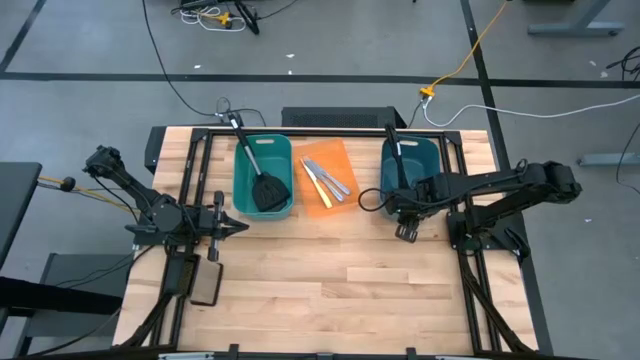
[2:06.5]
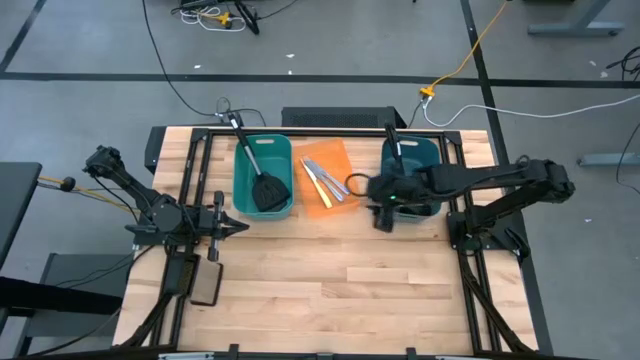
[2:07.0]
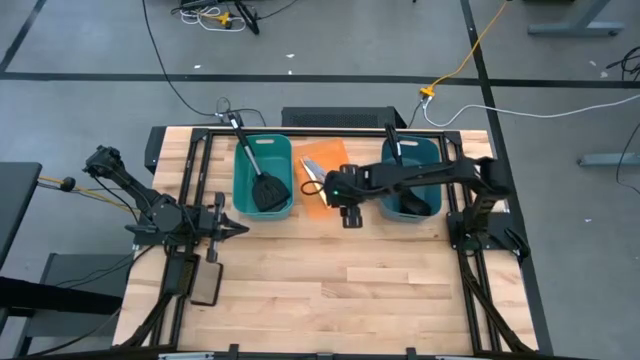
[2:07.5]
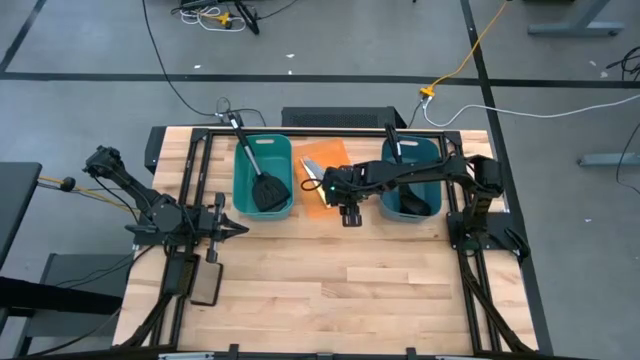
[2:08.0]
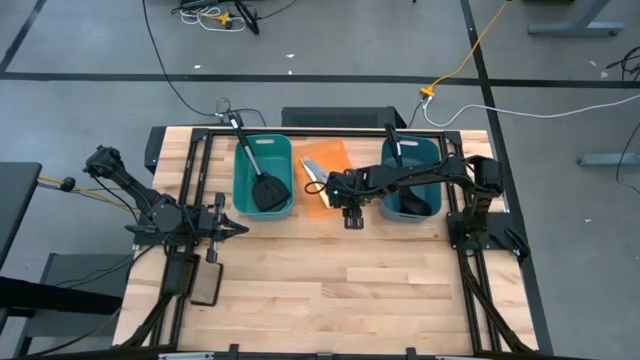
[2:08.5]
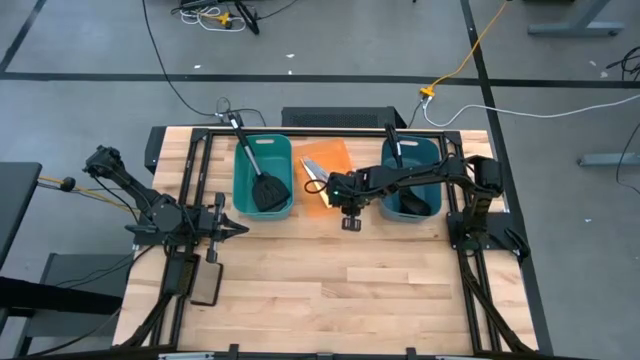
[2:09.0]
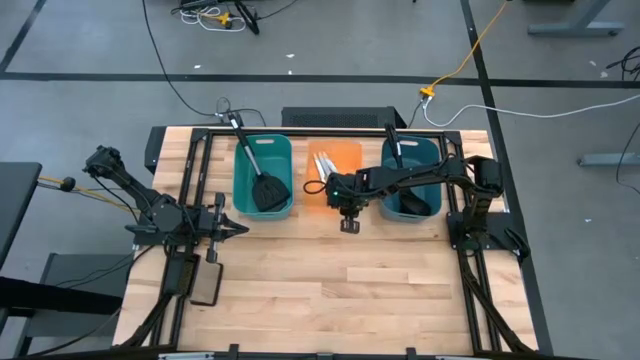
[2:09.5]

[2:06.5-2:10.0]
Task: Pick & Place Kitchen Items
Adjust the orange bin

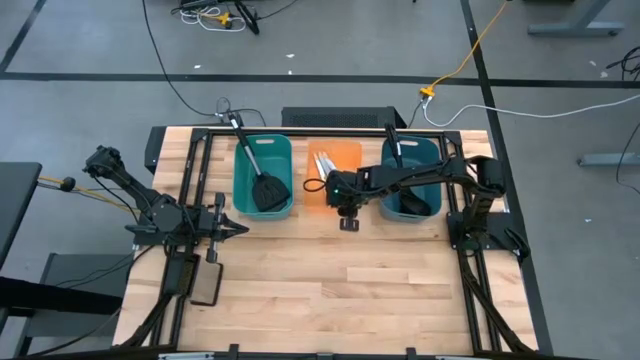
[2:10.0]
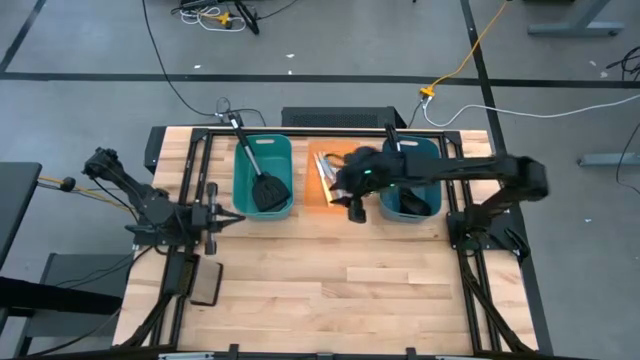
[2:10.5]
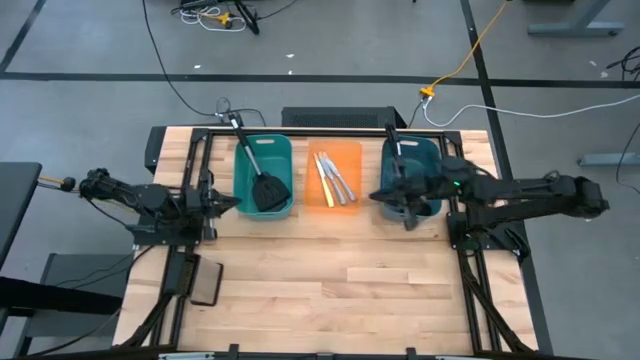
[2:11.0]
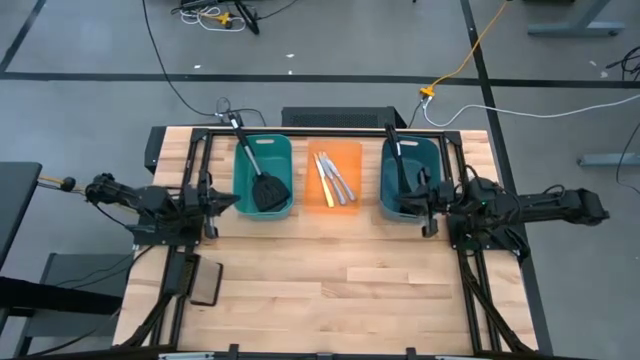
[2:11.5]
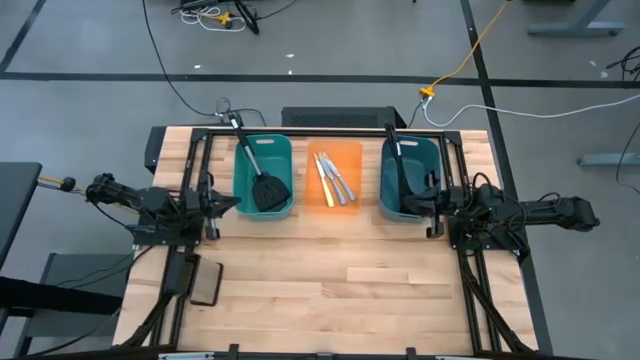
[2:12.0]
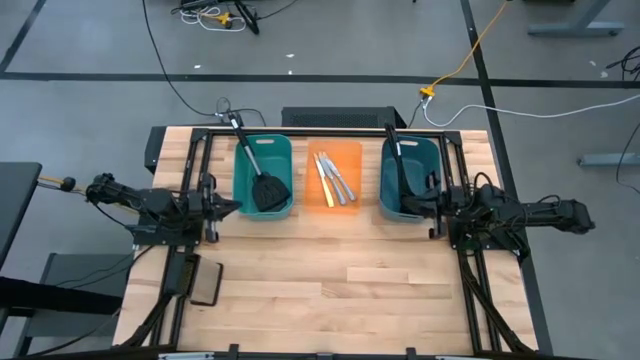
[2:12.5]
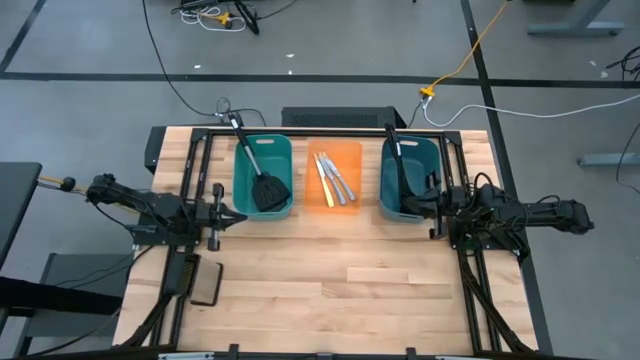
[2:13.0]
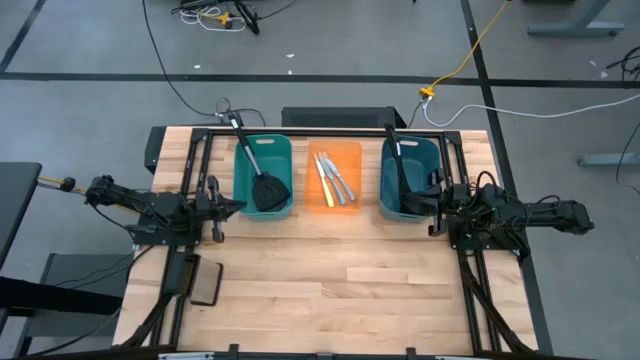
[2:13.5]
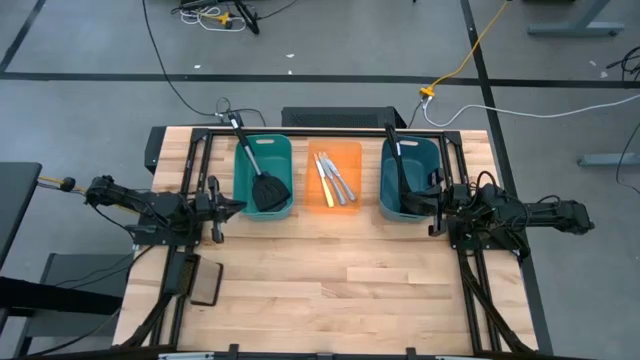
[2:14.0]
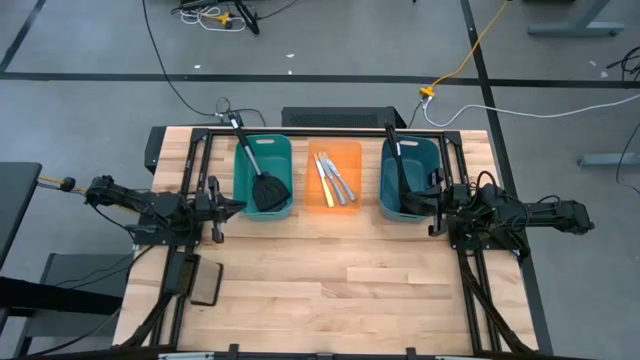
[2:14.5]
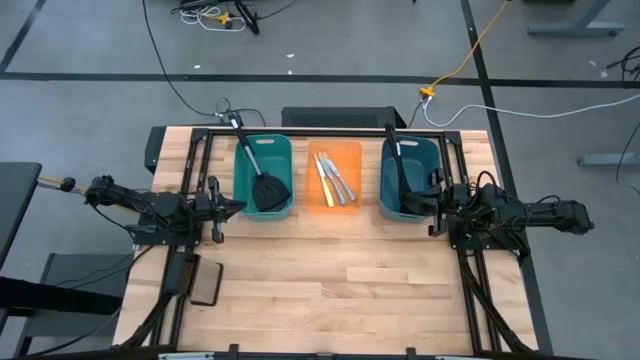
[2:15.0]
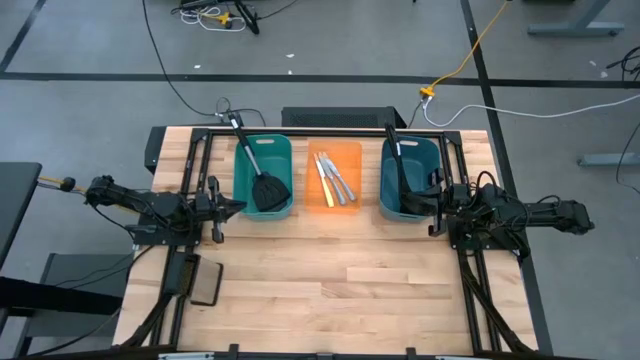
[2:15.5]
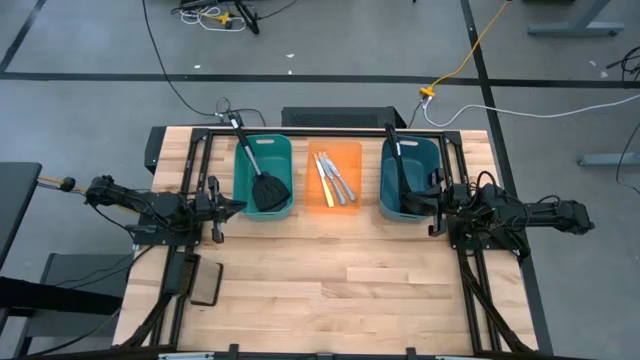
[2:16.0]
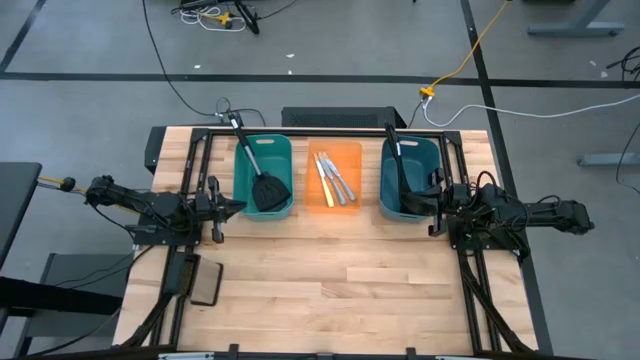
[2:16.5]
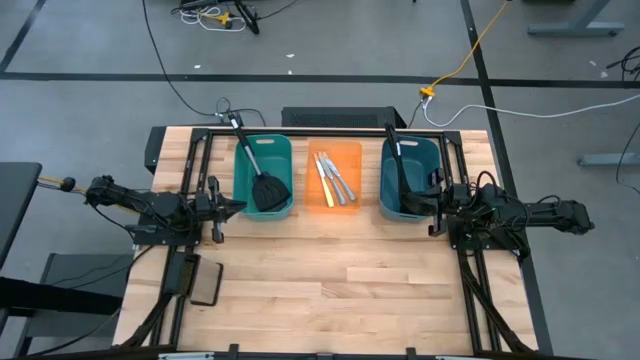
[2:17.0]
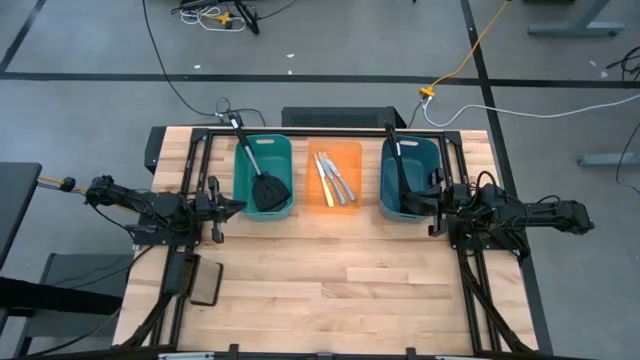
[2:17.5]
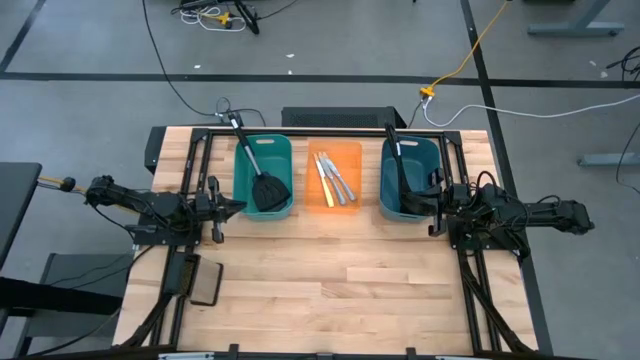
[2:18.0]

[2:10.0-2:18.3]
Return to Home position

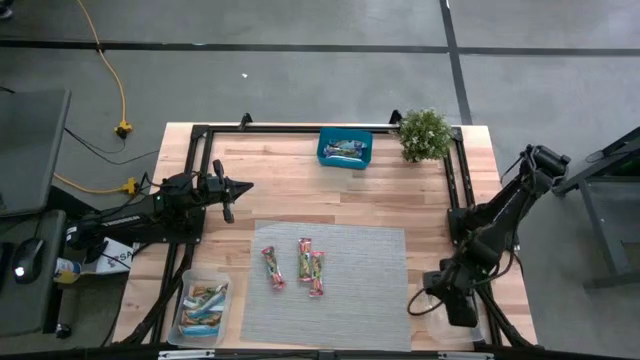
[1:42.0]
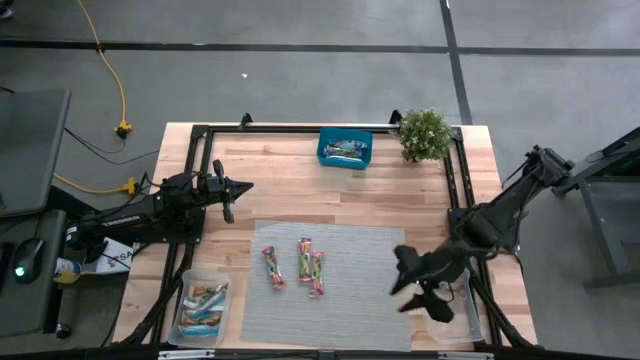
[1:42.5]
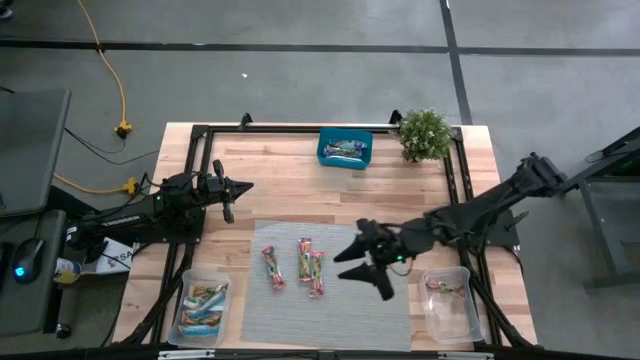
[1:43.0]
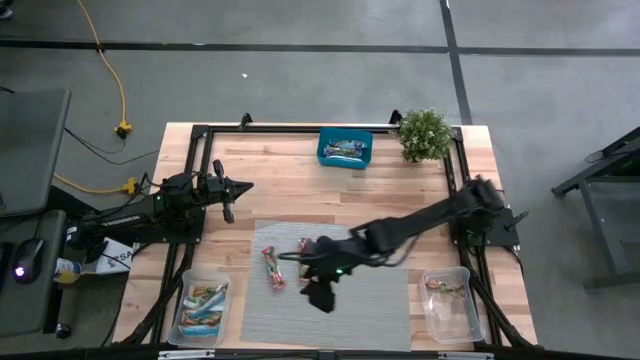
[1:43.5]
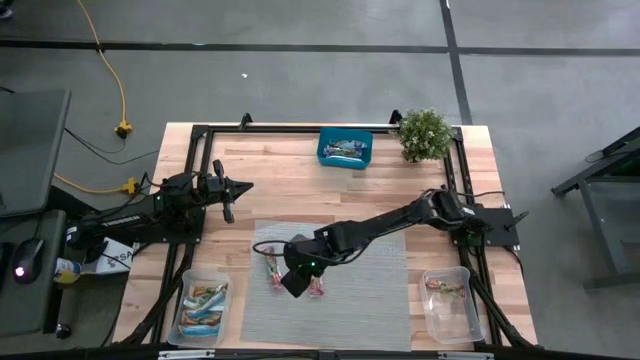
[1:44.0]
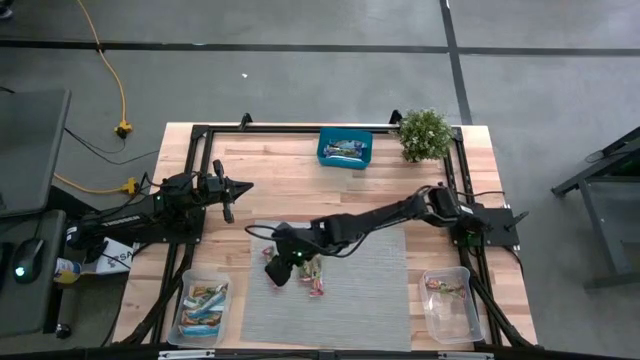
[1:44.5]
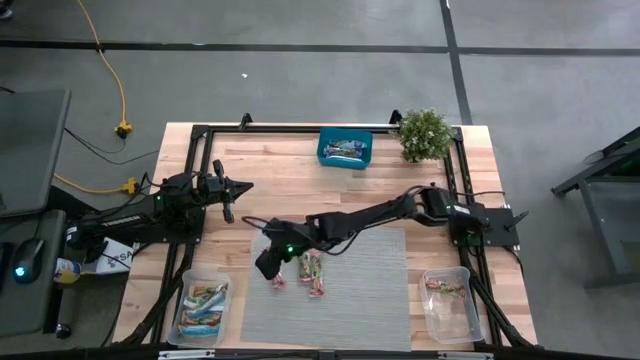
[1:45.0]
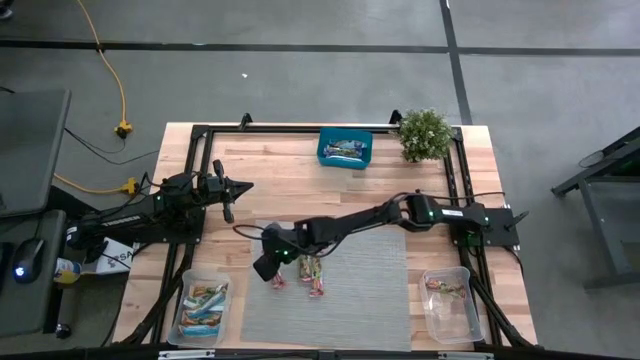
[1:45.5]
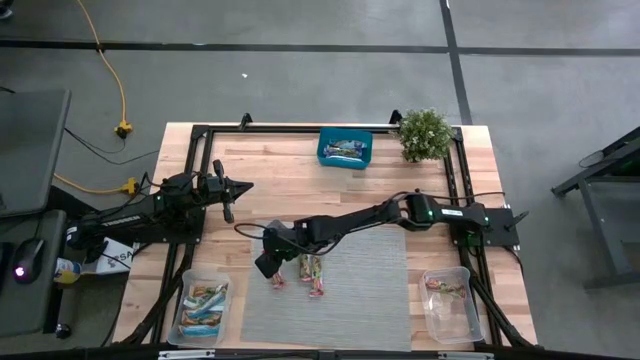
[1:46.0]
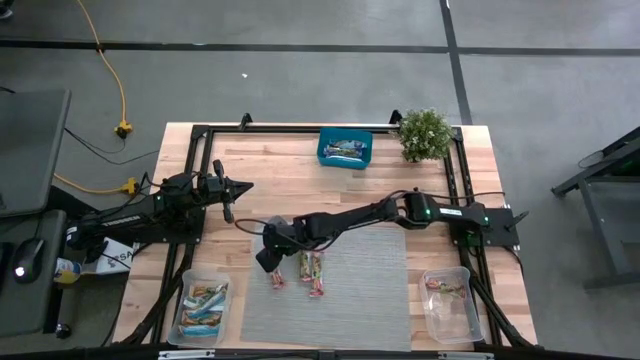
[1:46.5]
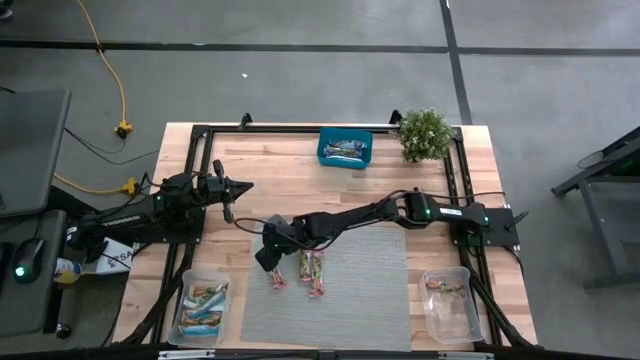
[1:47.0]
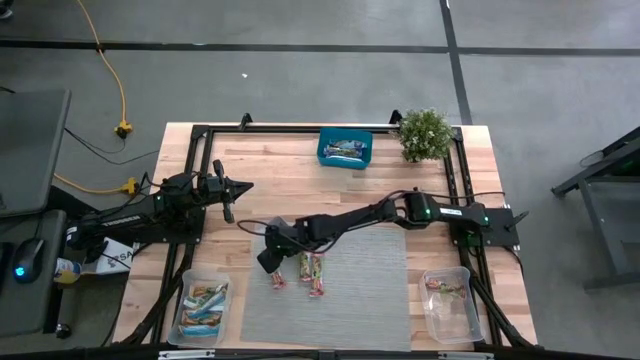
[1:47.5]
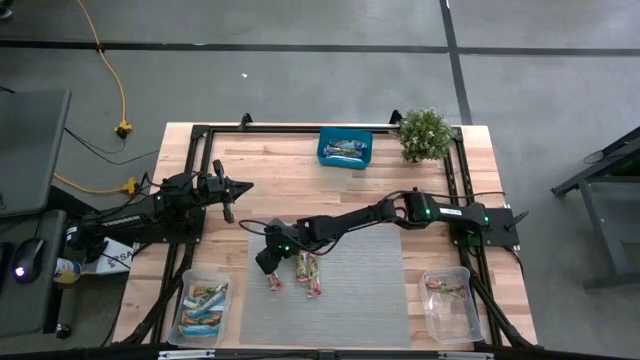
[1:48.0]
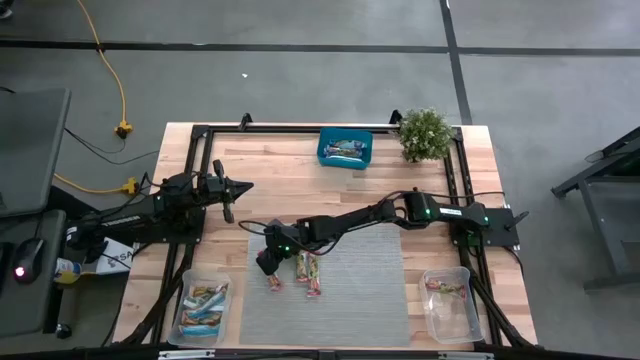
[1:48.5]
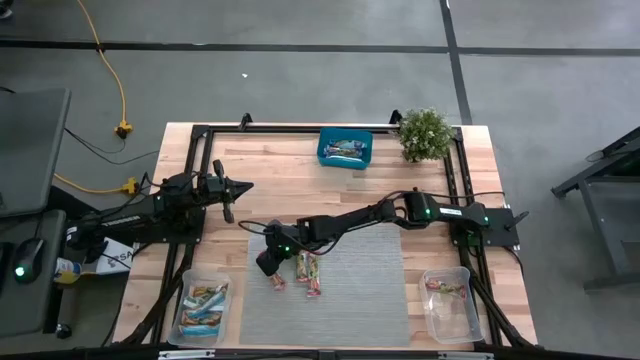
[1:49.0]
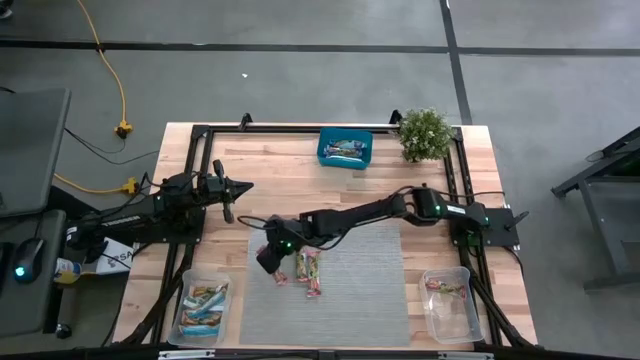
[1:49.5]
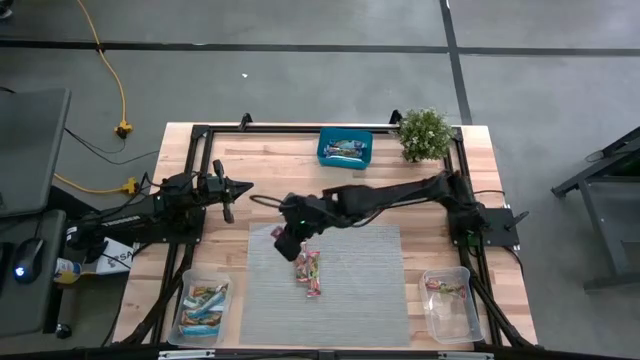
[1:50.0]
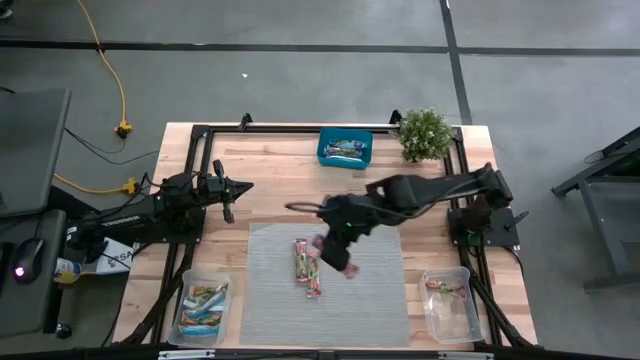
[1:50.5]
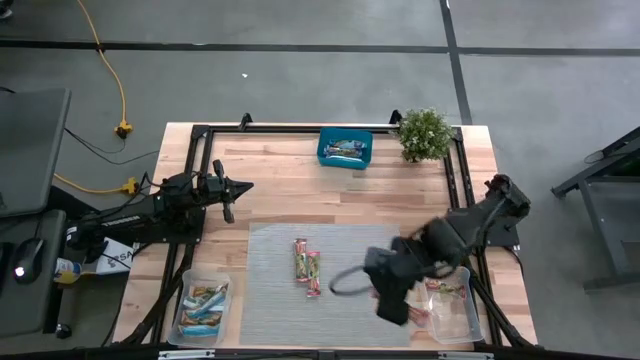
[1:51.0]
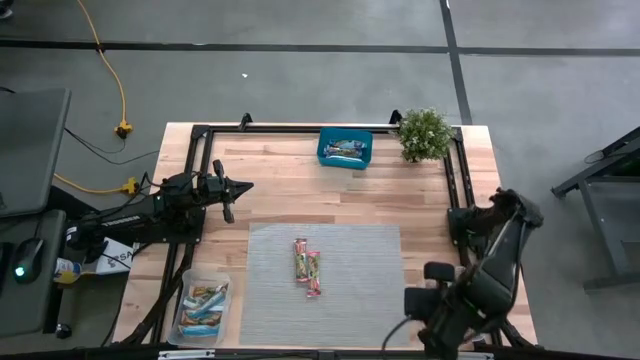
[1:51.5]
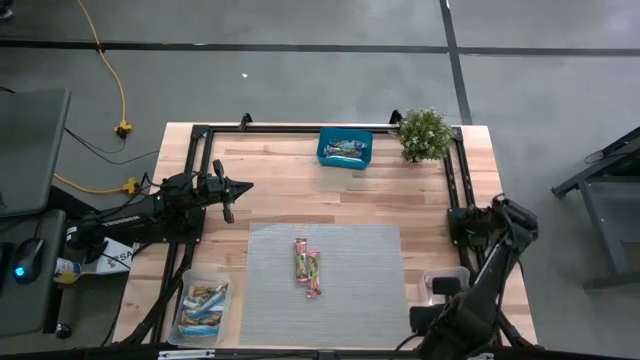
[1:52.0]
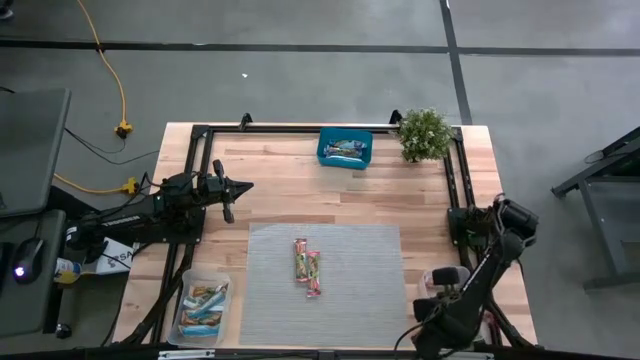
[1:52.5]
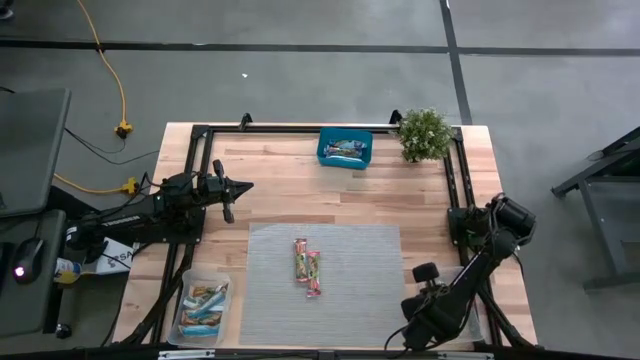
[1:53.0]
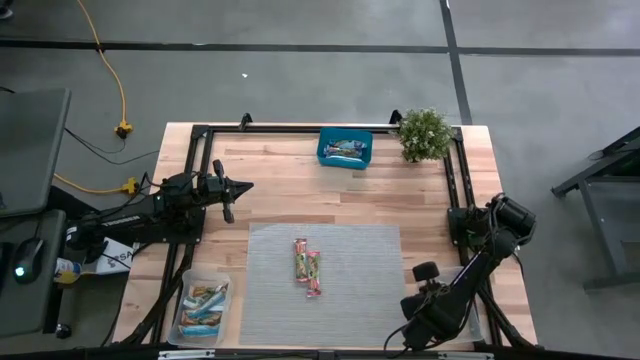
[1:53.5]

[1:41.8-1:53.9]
Task: Pick and place Granola Bars by type
Put the red granola bar into the right transparent bin
